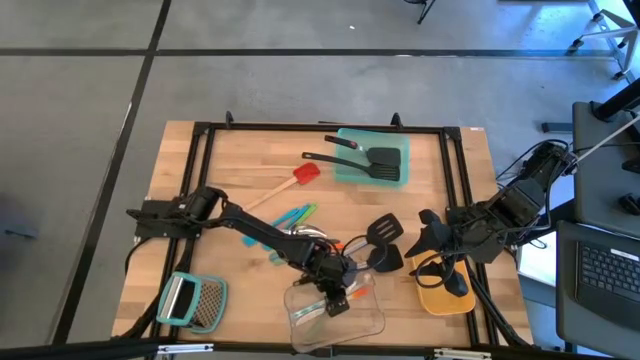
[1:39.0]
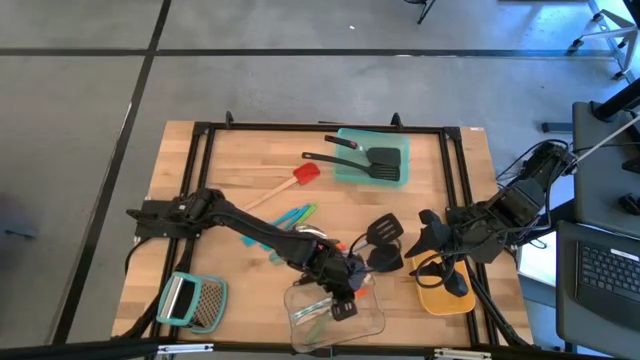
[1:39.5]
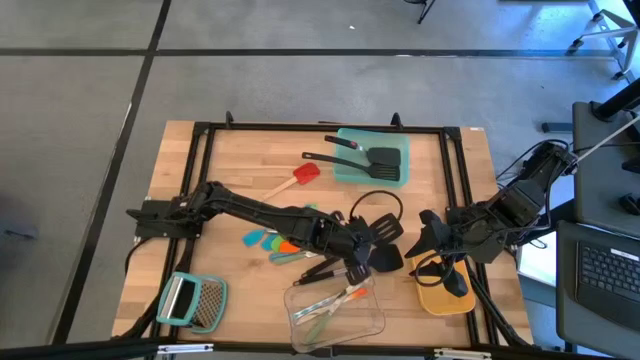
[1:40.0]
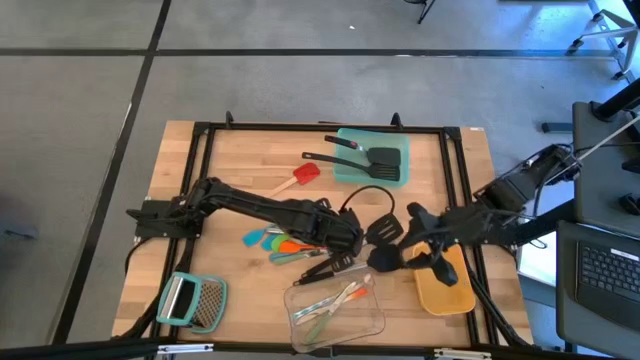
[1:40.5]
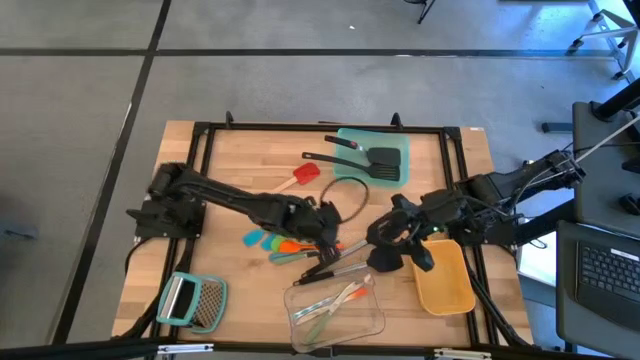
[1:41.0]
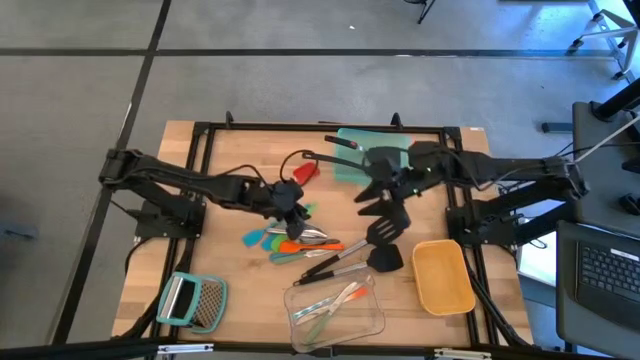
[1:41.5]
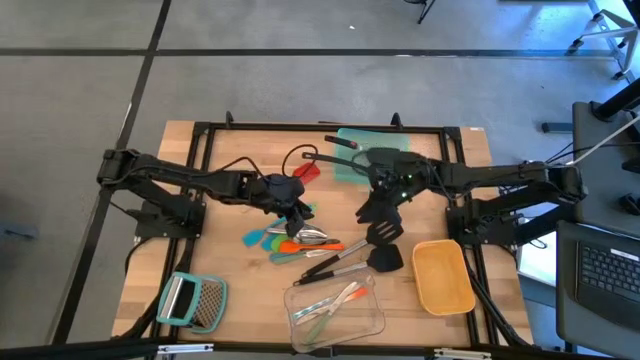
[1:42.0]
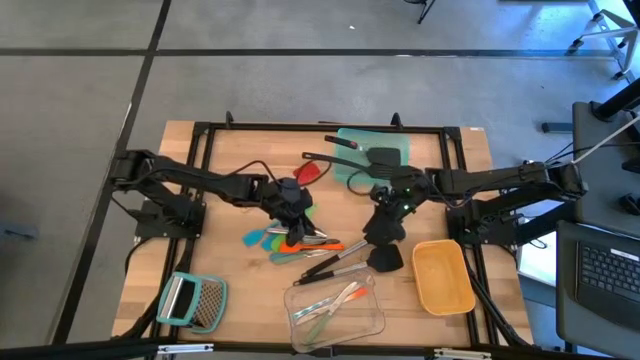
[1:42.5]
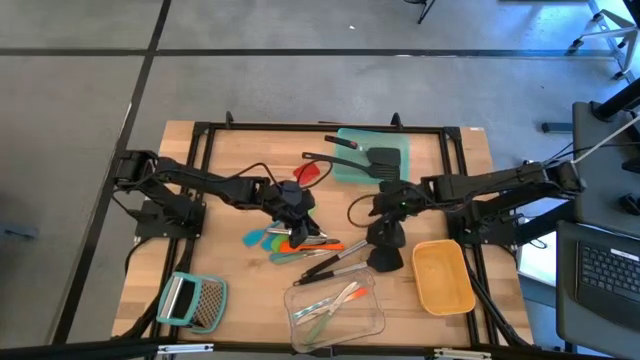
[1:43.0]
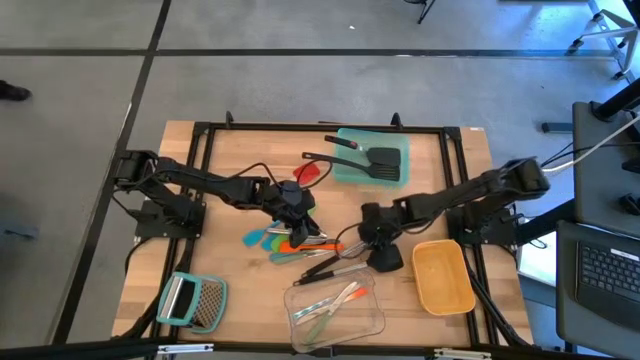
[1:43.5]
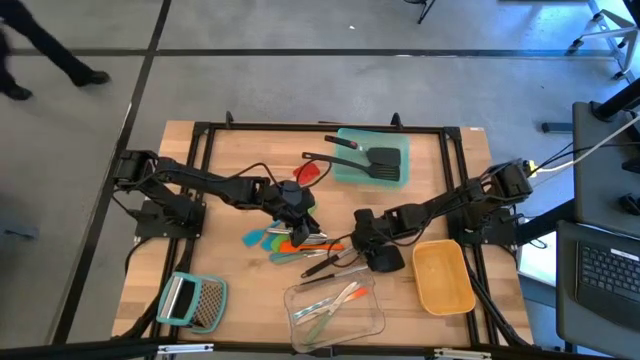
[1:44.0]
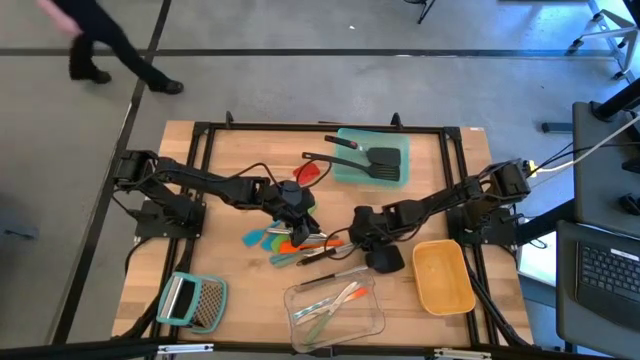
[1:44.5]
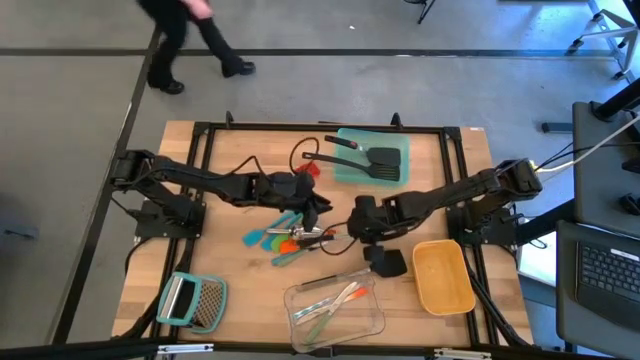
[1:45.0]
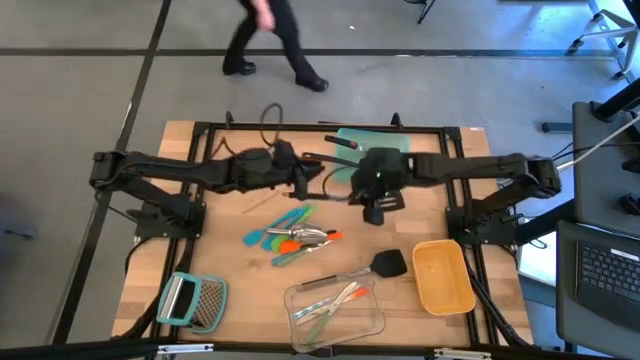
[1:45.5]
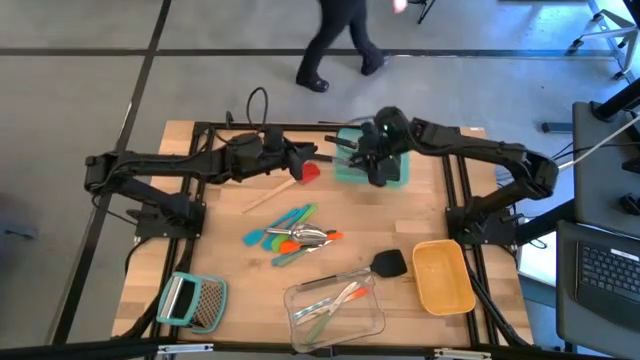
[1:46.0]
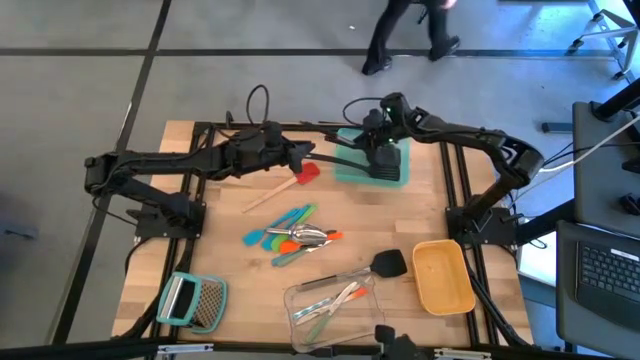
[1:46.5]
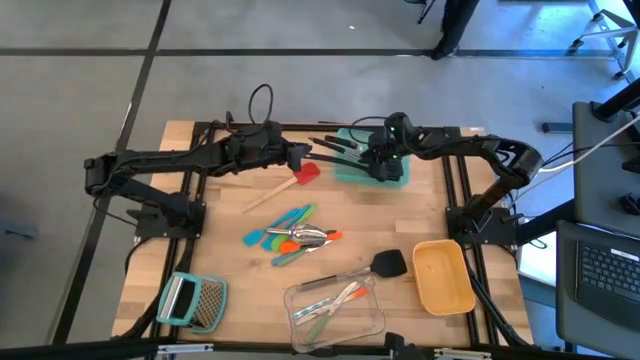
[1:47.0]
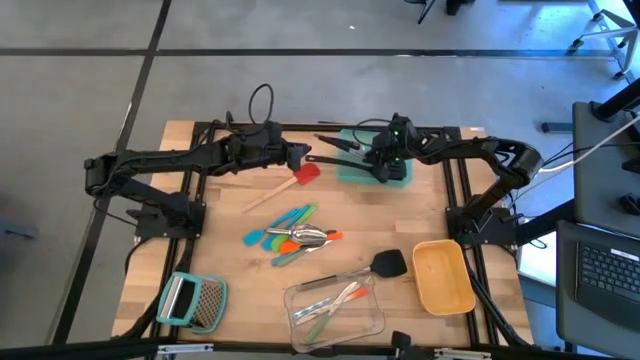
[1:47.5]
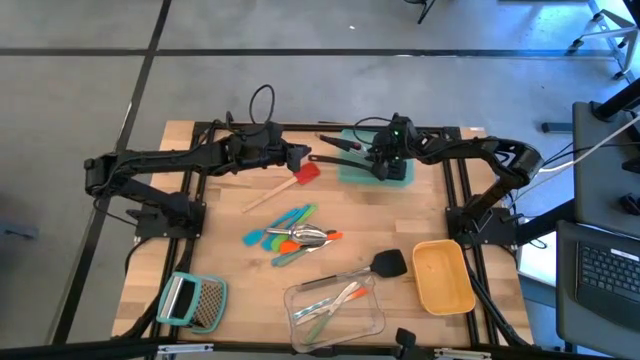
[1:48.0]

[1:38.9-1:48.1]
Task: Pick & Place Kitchen Items
Put the spatula into the green bin

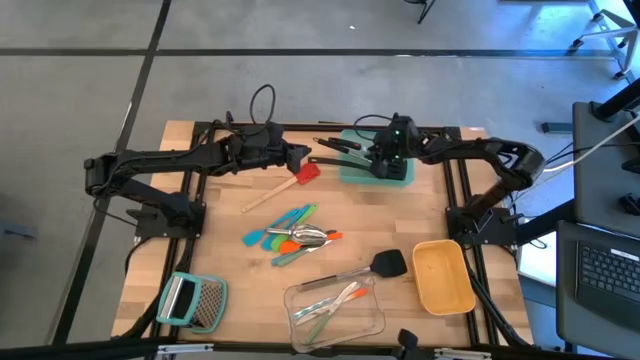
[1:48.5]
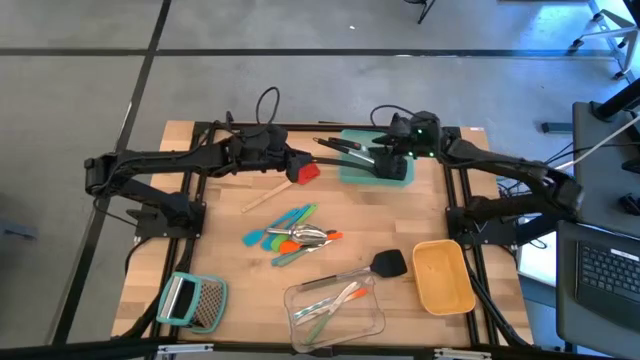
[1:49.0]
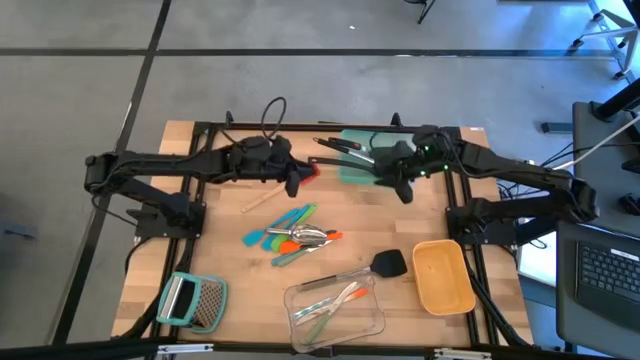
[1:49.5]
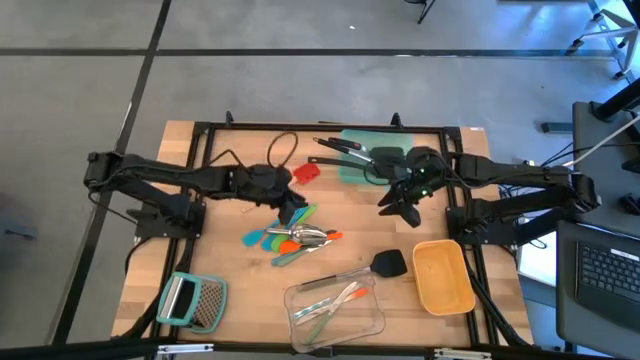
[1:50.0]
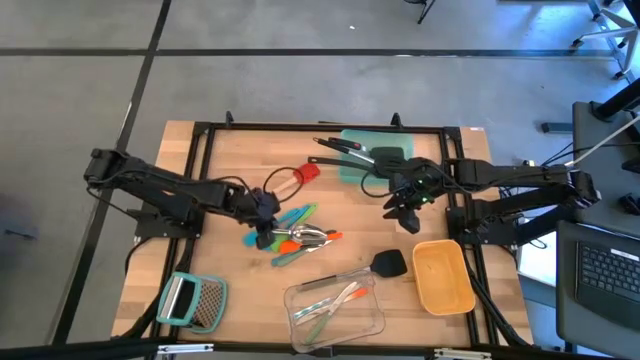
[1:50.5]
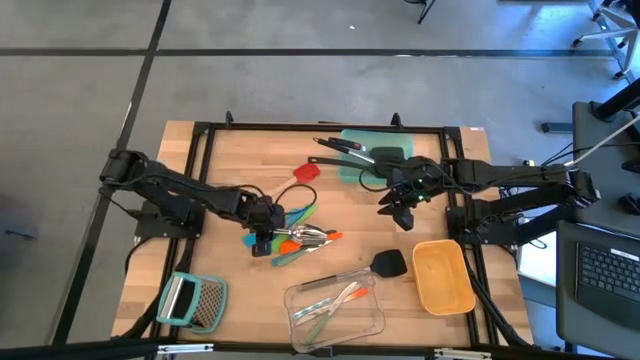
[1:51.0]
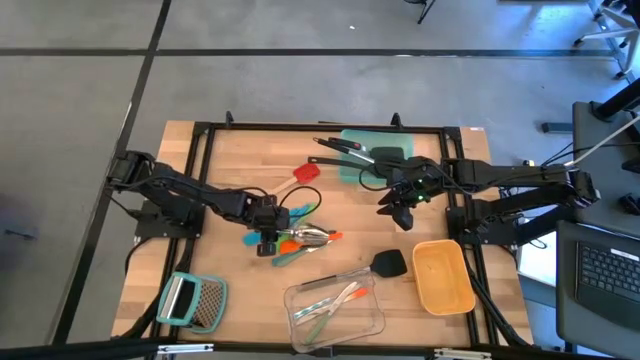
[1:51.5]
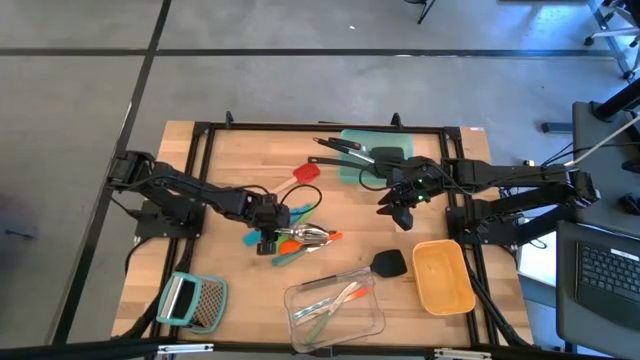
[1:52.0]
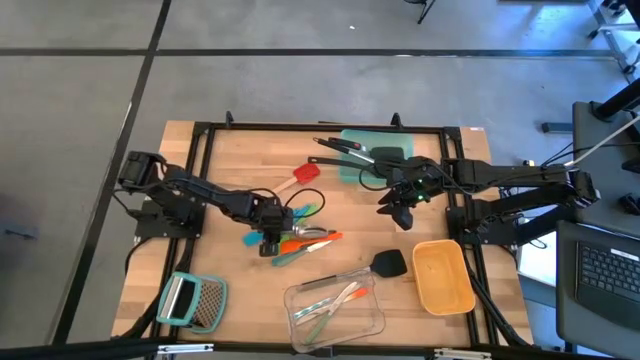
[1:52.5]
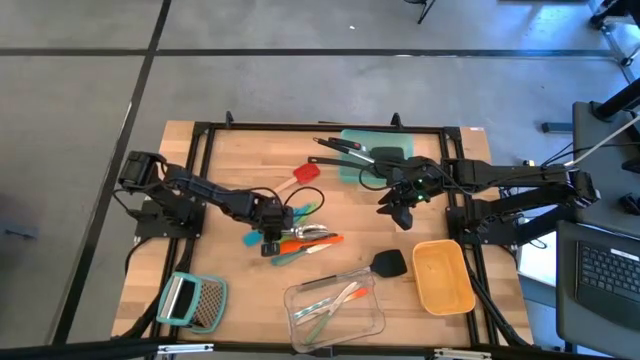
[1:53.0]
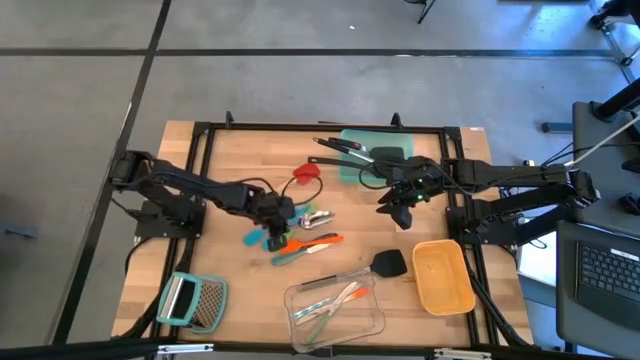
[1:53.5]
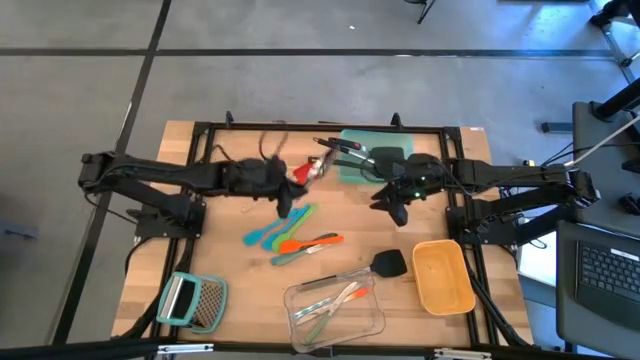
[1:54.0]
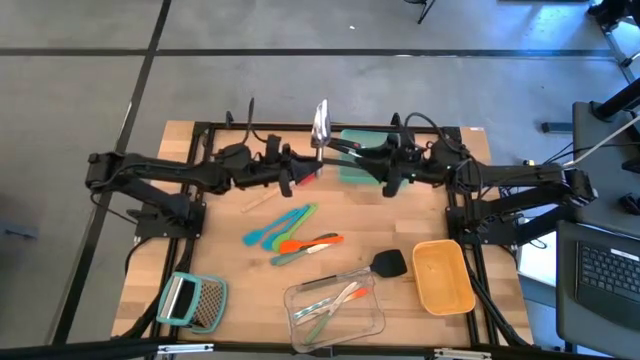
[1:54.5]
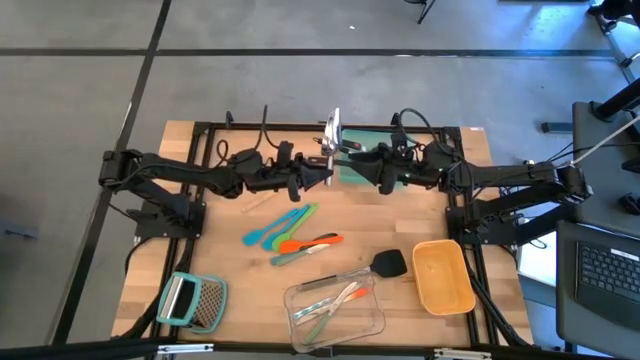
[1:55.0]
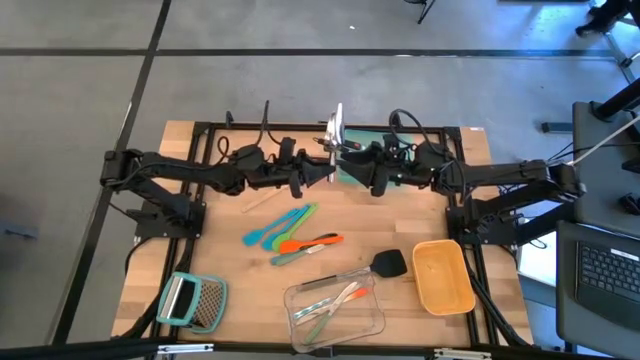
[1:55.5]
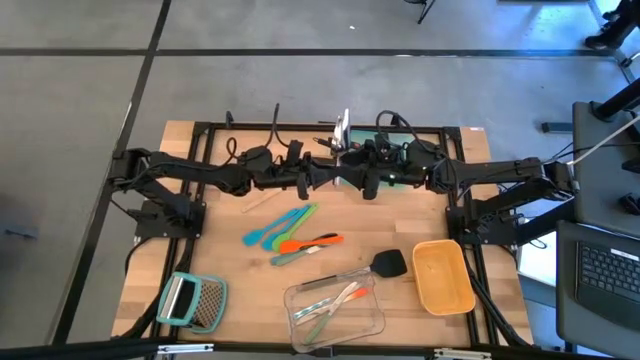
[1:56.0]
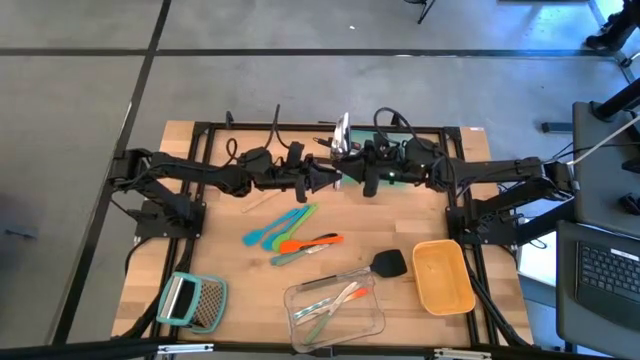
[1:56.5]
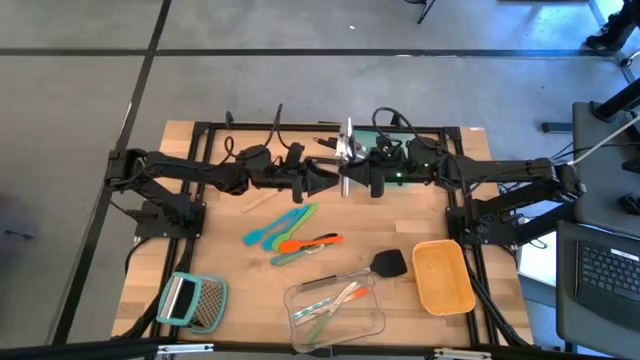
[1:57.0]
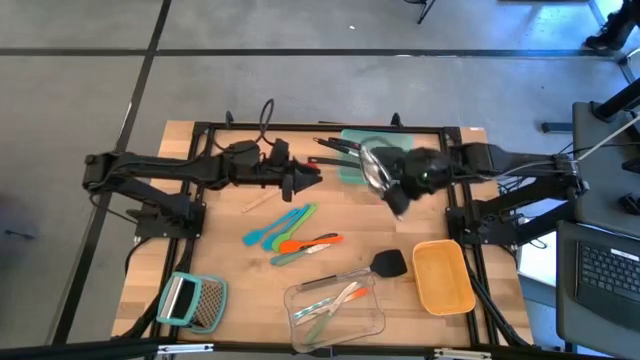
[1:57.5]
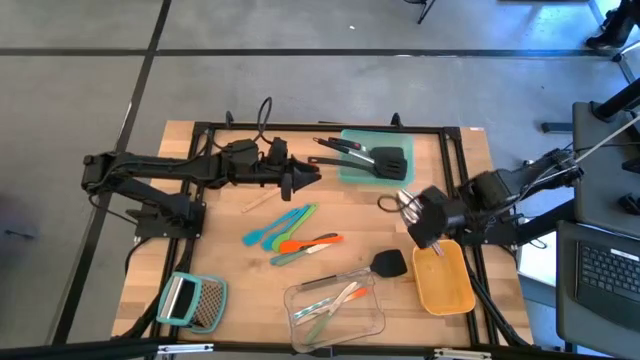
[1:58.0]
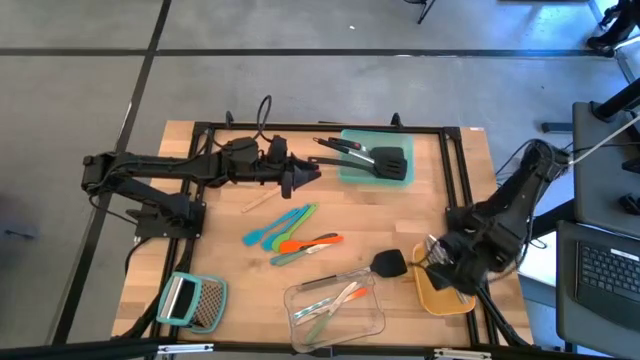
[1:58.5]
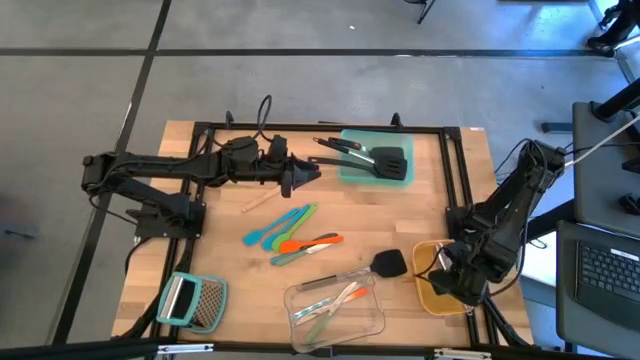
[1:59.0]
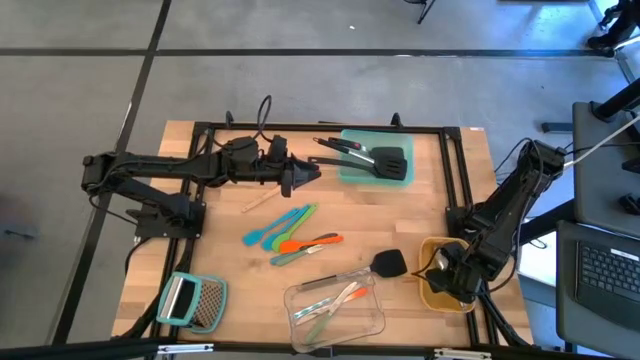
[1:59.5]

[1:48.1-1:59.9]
Put the silver rice scooper into the yellow bin
